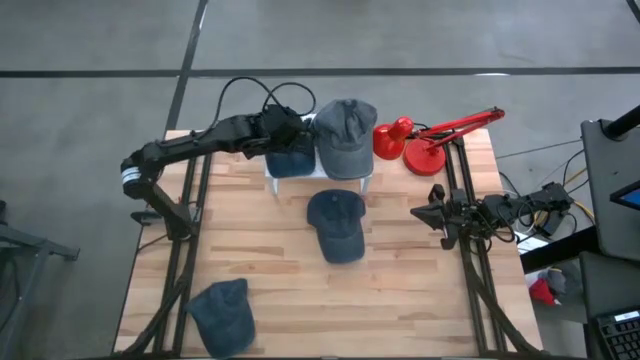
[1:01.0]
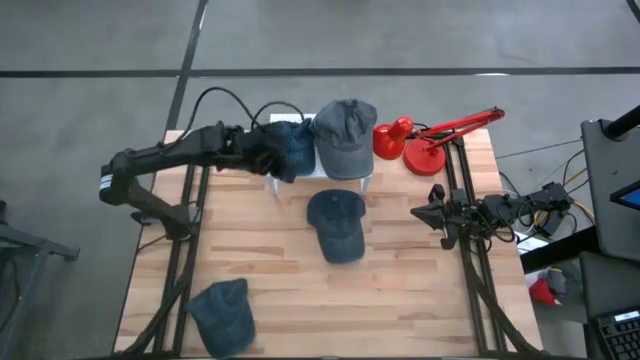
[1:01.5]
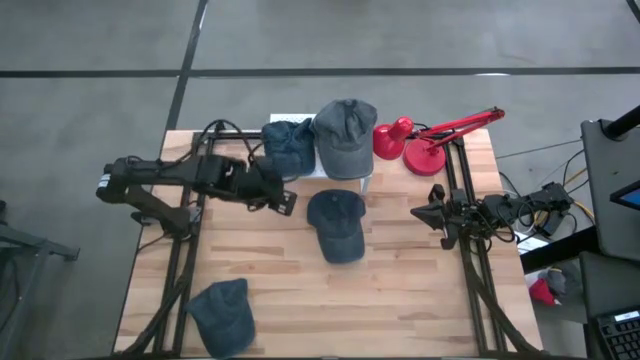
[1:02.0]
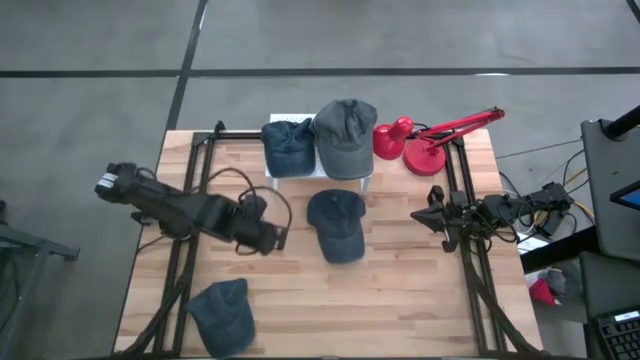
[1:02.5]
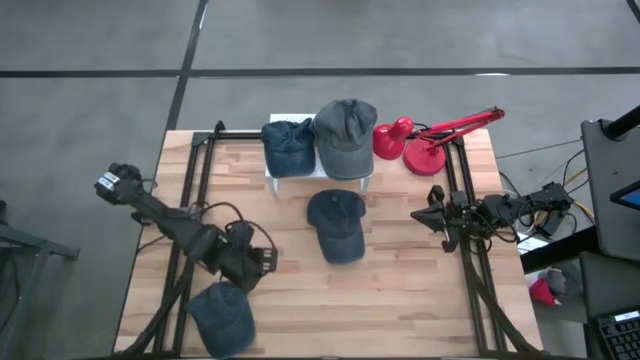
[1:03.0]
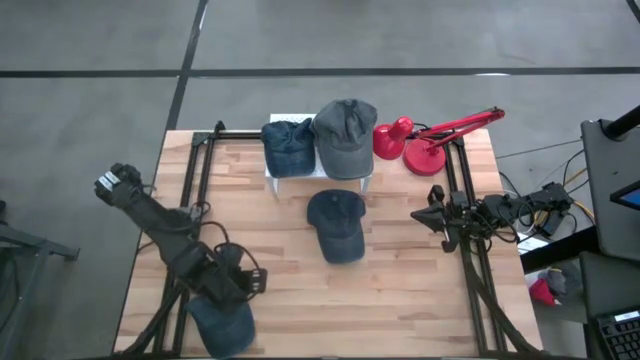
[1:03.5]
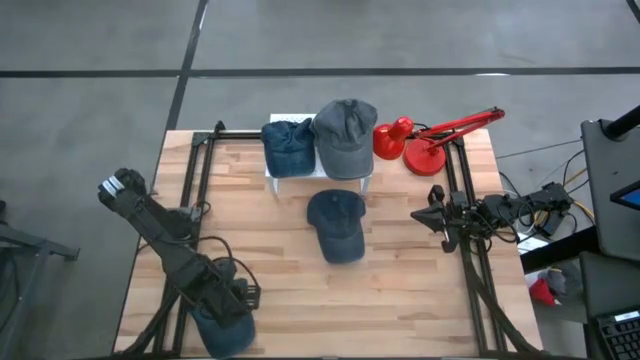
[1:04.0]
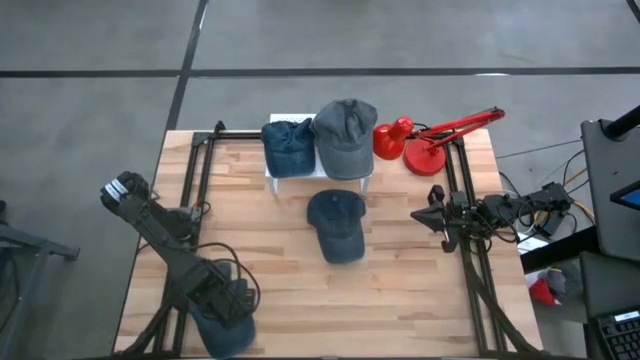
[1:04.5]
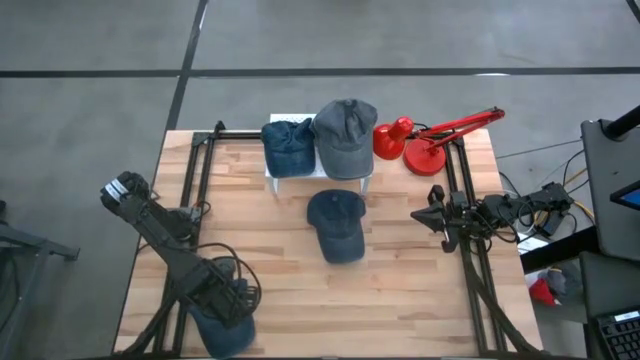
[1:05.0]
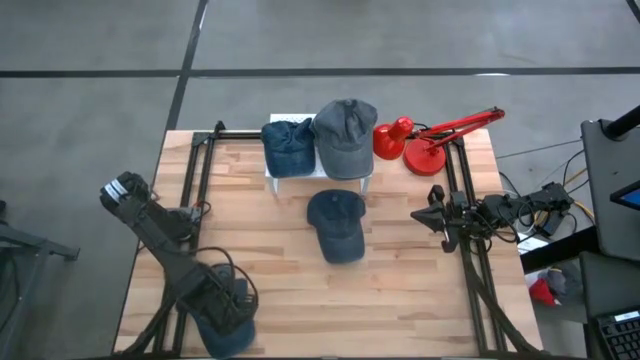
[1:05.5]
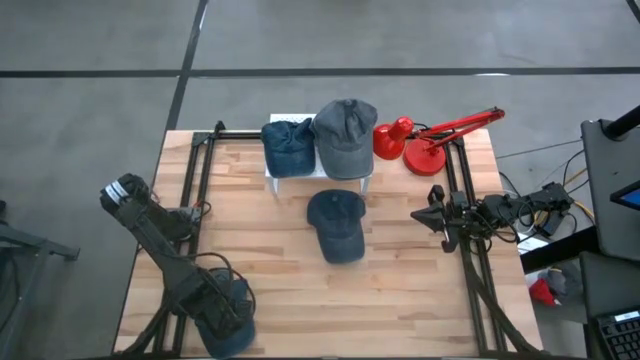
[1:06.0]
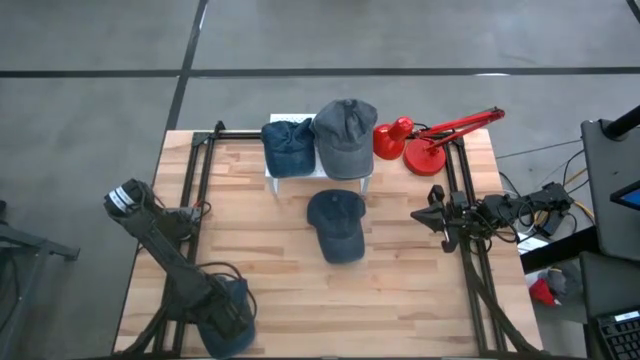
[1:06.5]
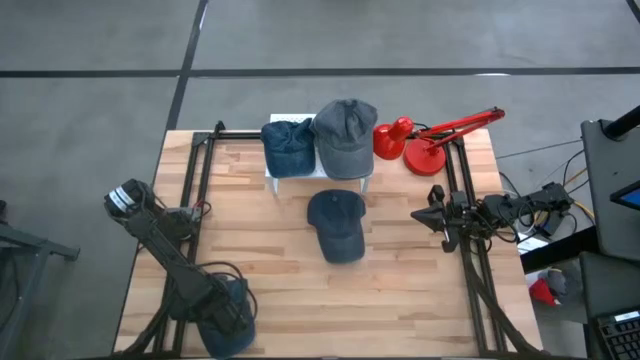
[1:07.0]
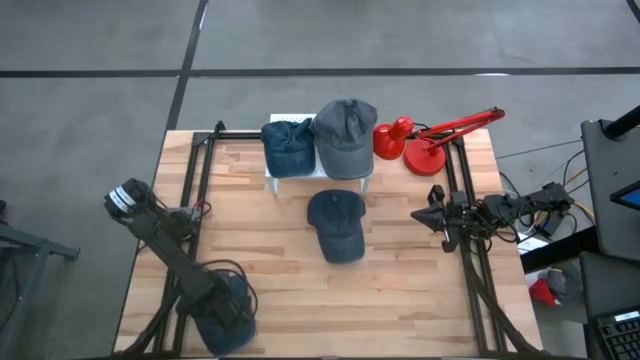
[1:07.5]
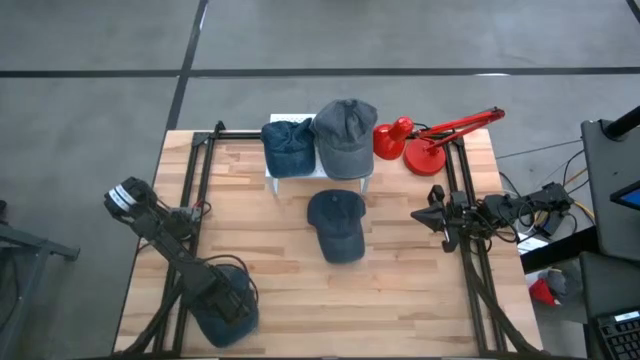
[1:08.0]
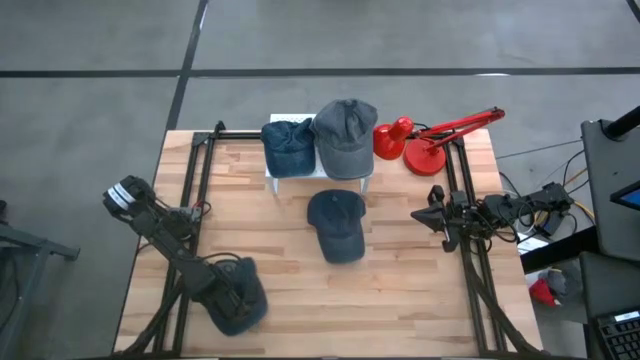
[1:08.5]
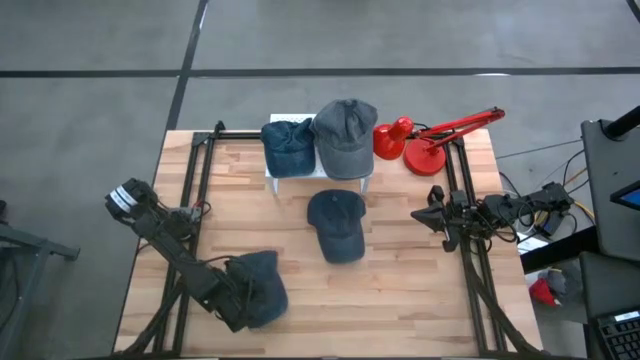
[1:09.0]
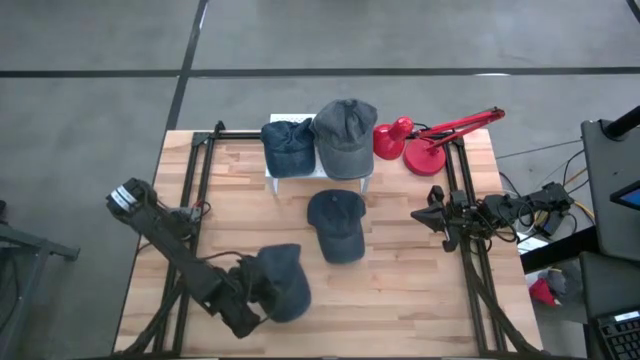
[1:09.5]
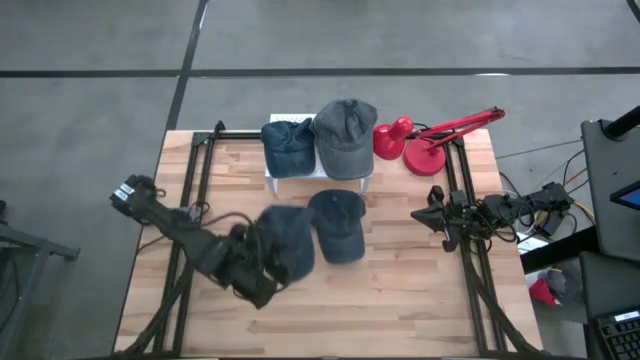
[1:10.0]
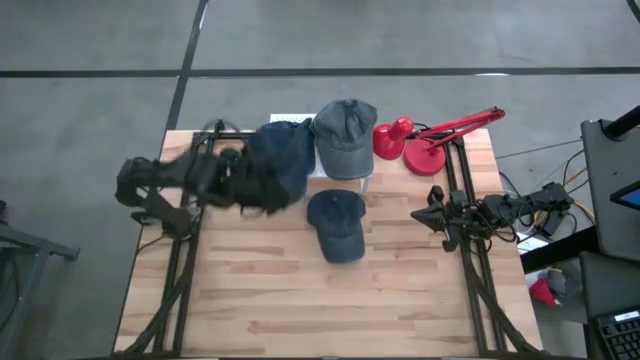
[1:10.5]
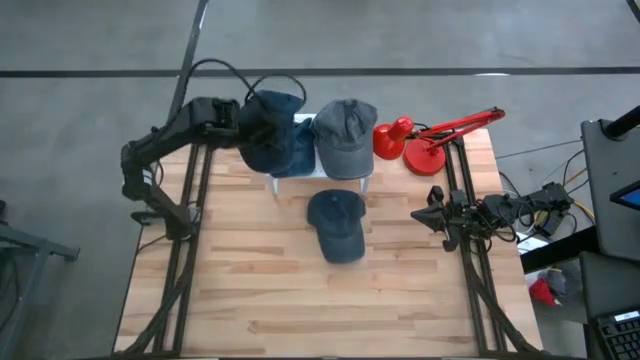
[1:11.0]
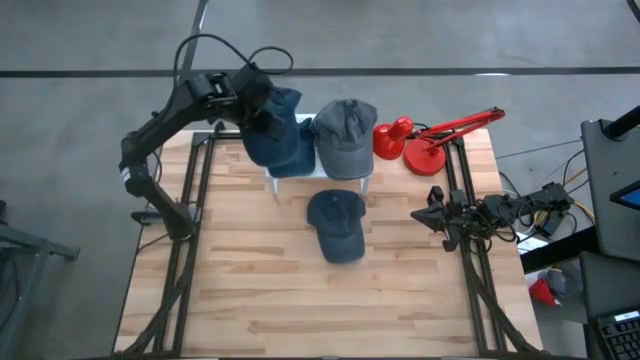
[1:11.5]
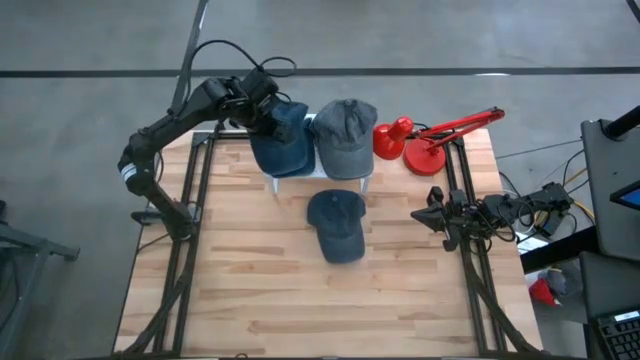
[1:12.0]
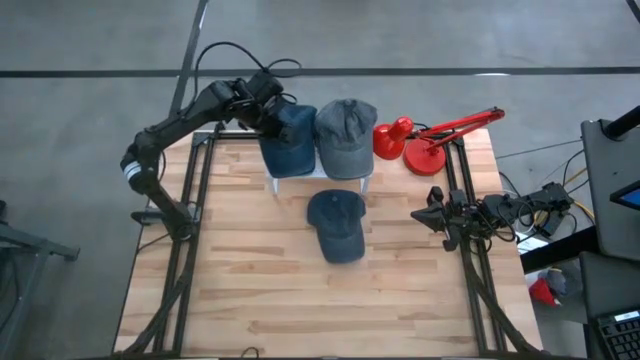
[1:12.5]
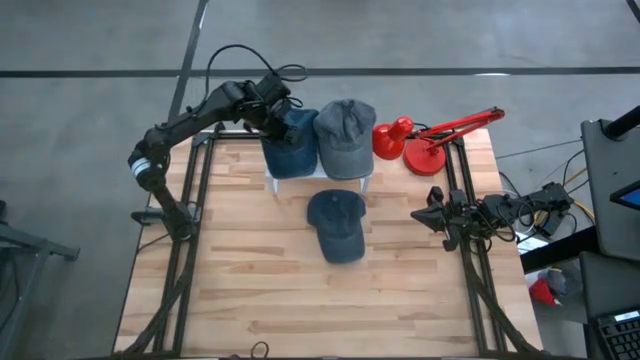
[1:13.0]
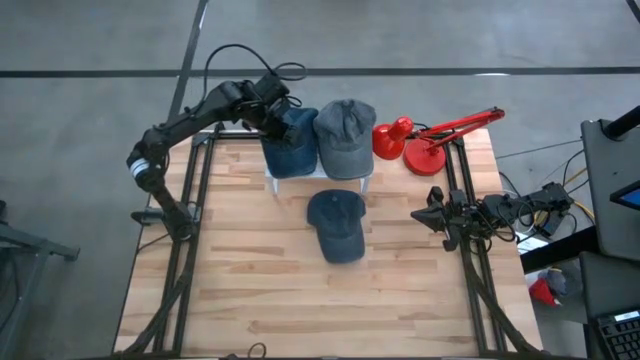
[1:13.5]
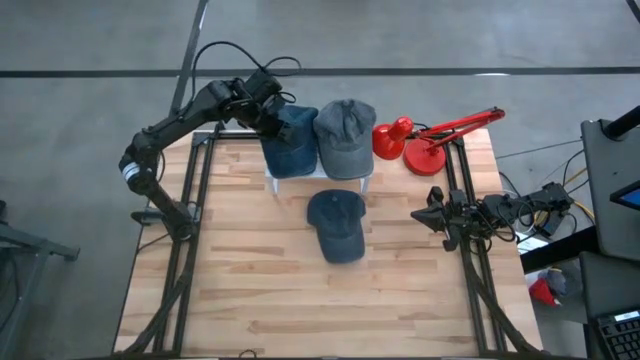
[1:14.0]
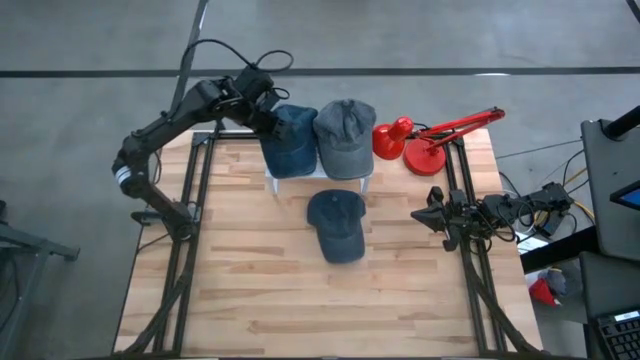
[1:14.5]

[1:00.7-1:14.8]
Task: Pick & Place hat
Put the bottom blue cap on the shelf

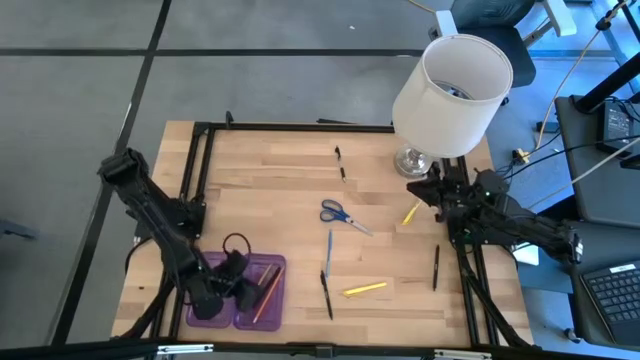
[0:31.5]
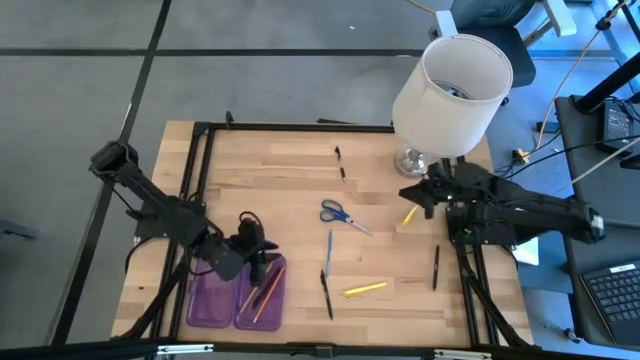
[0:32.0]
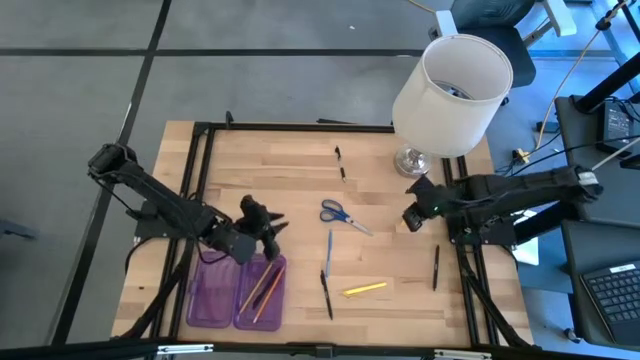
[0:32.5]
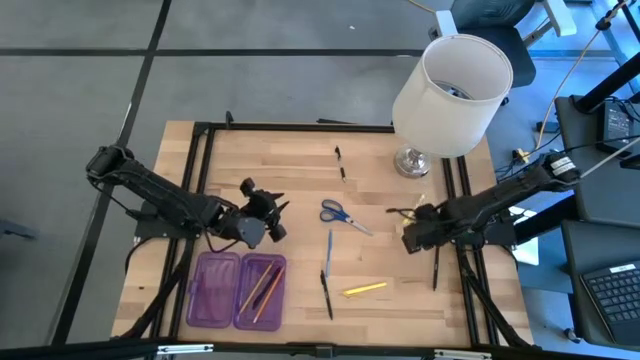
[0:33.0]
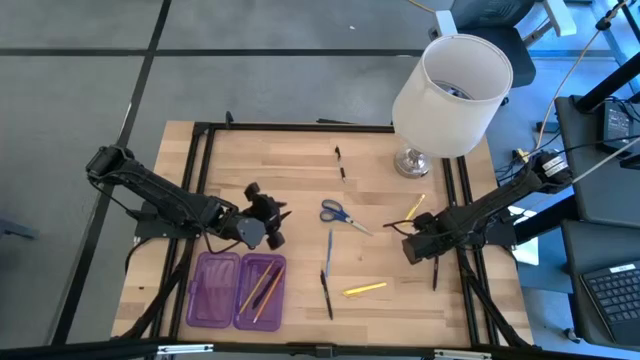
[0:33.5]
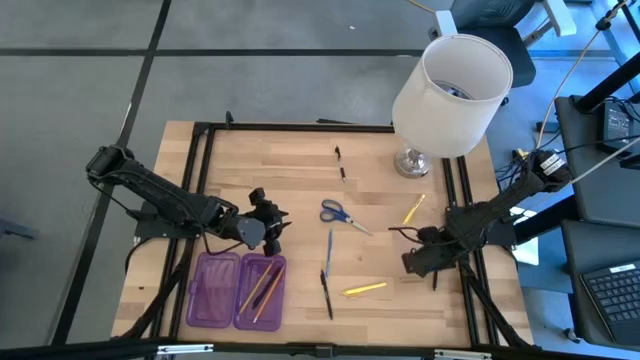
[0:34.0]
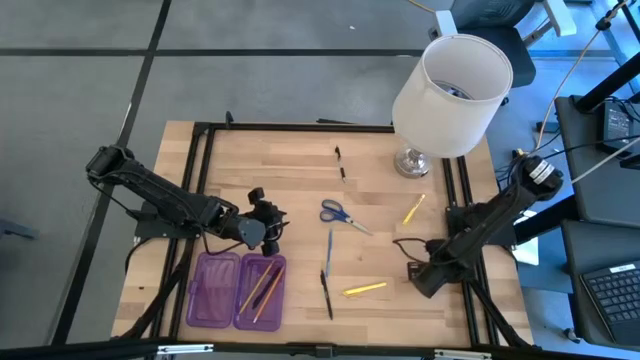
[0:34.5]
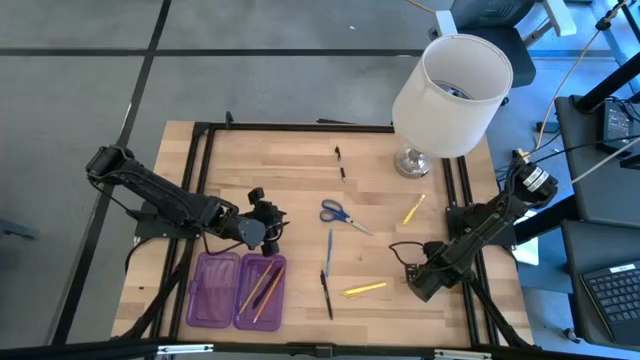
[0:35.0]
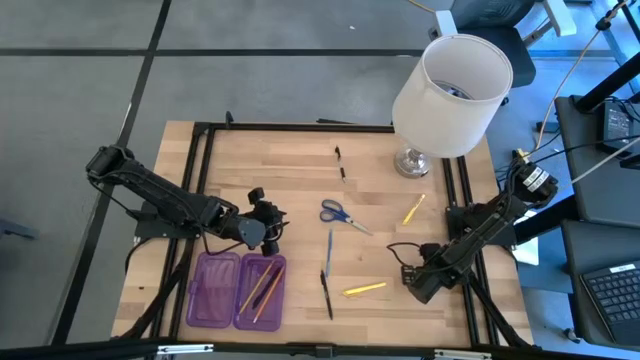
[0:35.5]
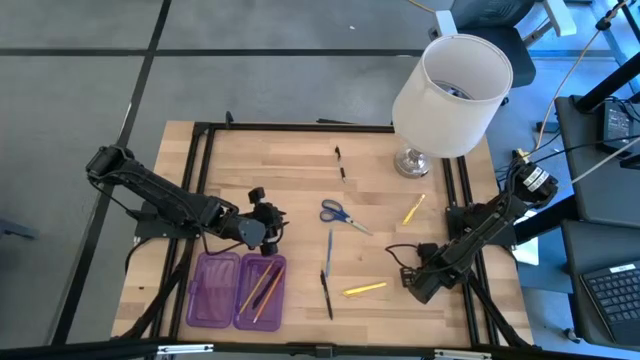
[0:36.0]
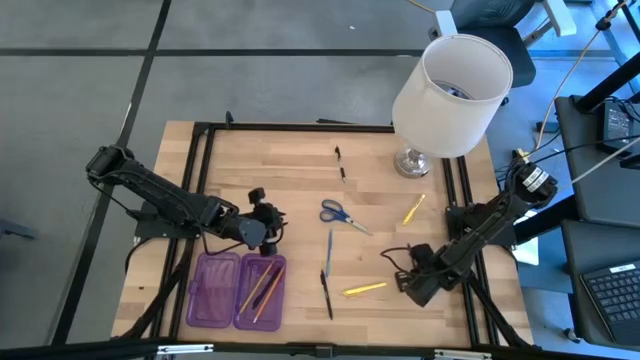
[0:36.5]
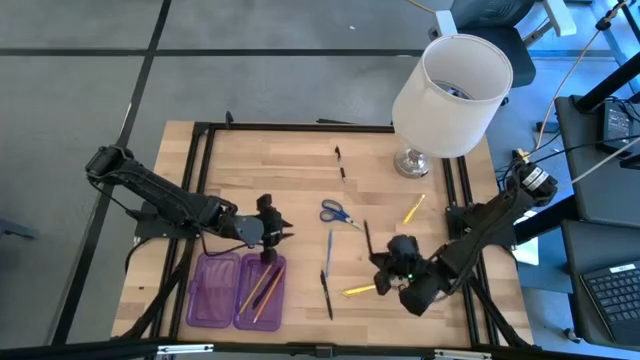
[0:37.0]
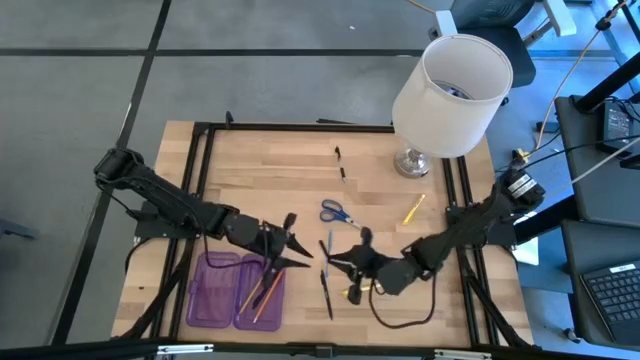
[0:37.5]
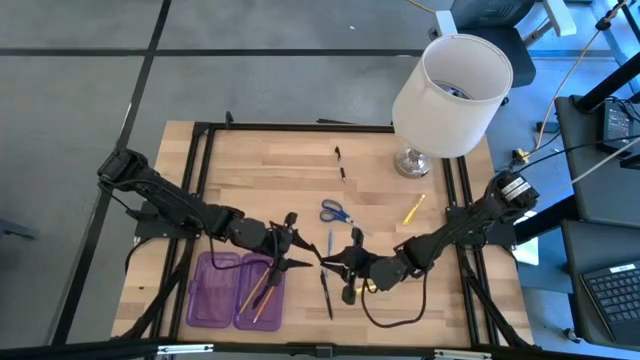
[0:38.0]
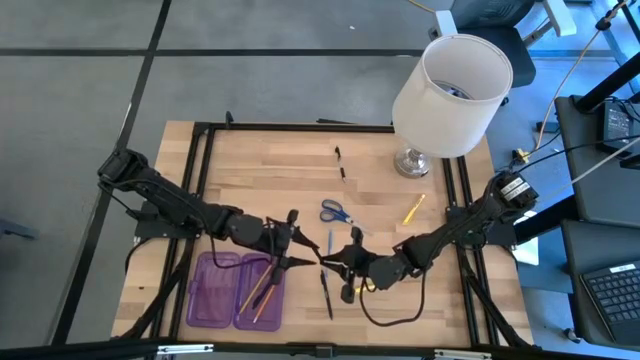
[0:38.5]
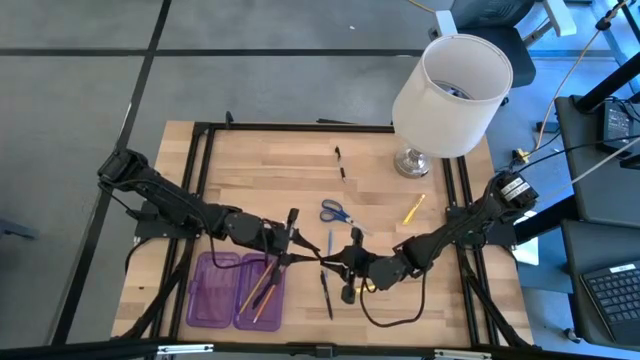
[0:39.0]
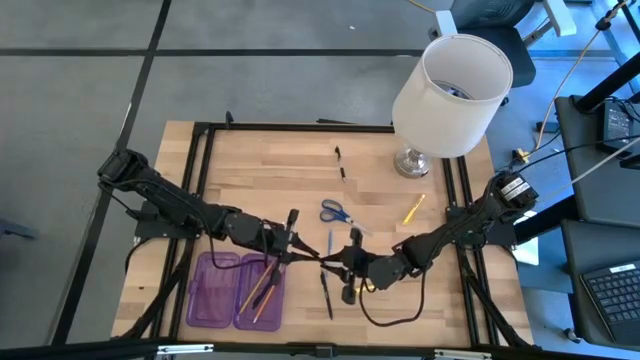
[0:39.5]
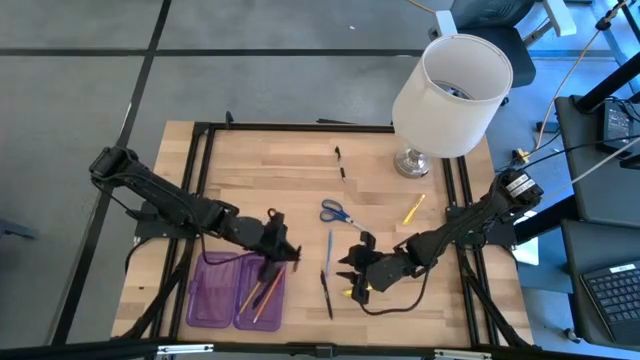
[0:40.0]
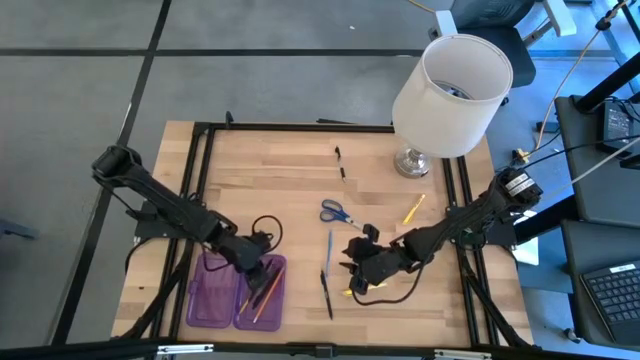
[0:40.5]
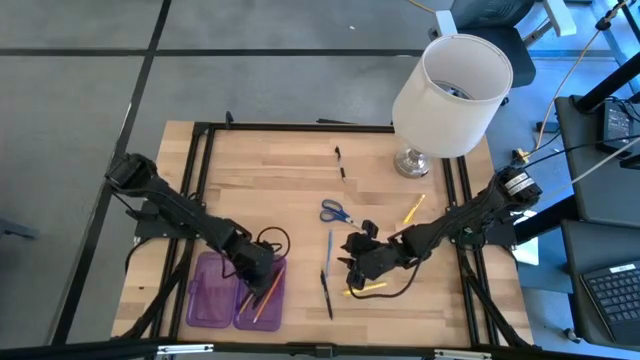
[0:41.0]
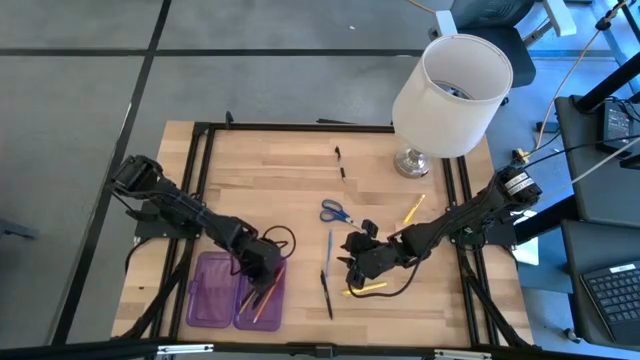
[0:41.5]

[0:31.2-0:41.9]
Task: Pick & place school supplies into a supply box
Put the right black pen into the violet box
